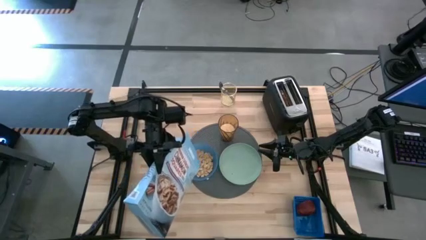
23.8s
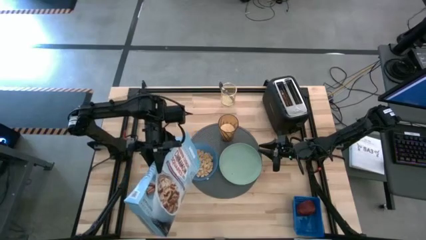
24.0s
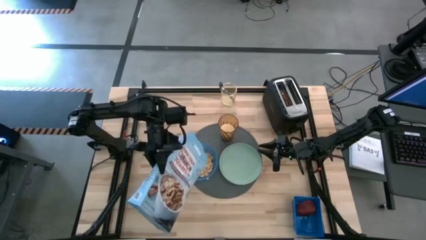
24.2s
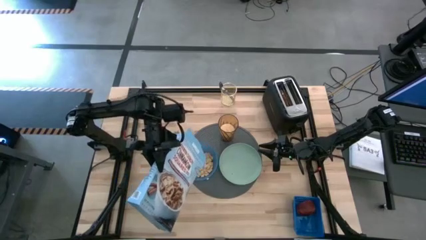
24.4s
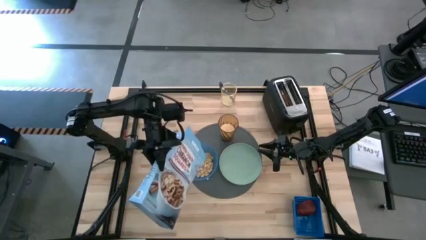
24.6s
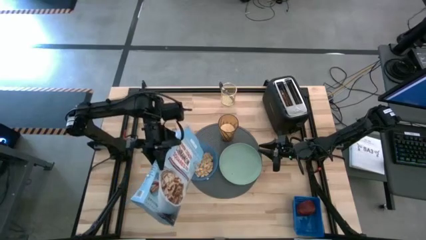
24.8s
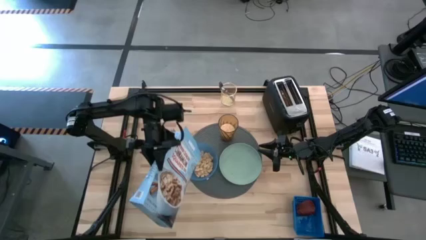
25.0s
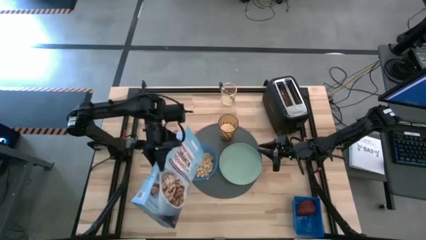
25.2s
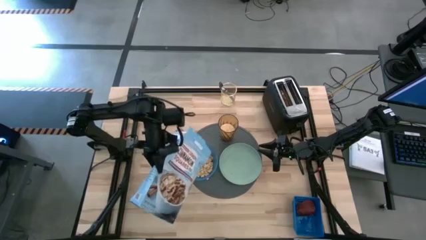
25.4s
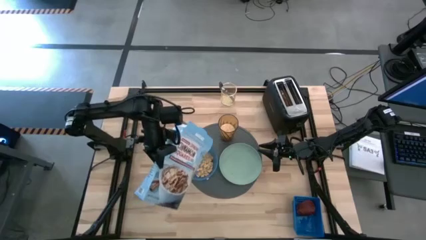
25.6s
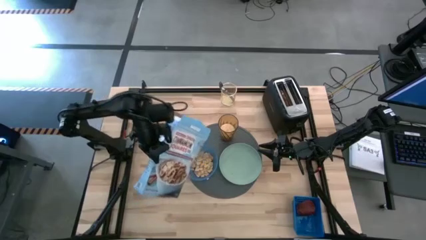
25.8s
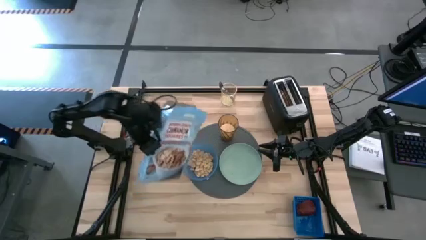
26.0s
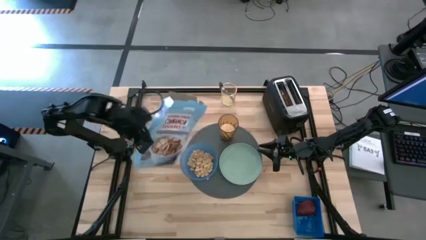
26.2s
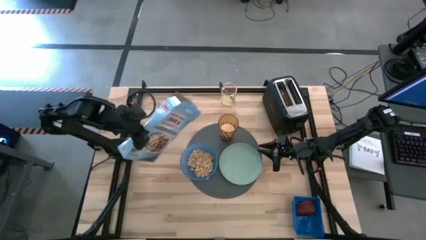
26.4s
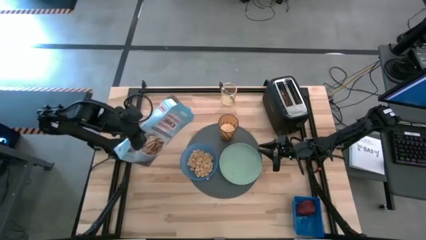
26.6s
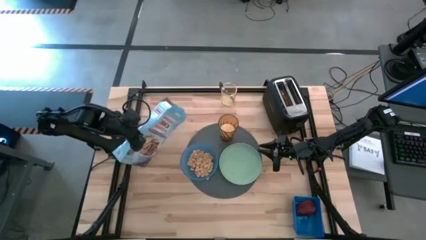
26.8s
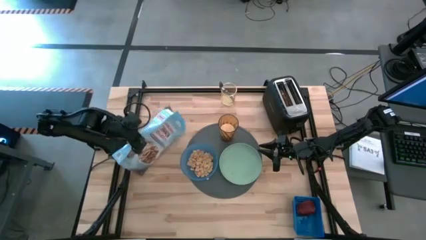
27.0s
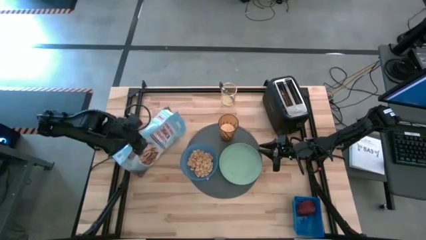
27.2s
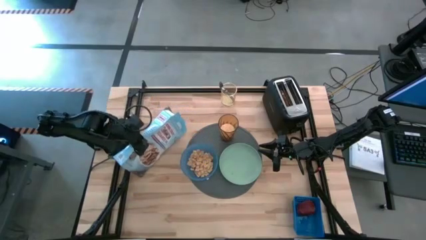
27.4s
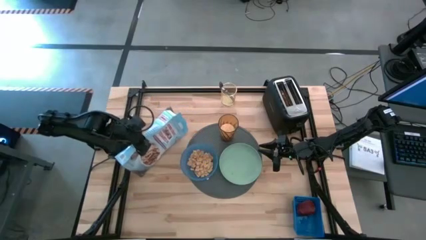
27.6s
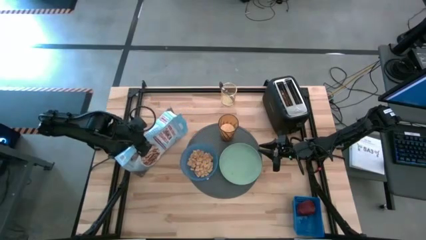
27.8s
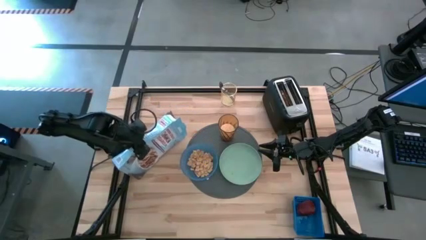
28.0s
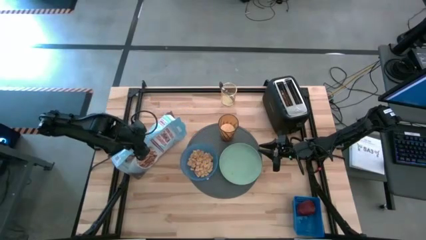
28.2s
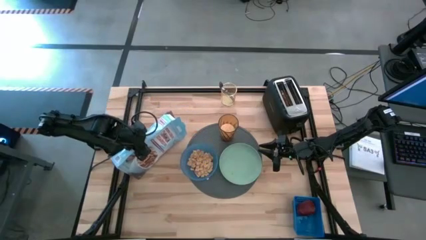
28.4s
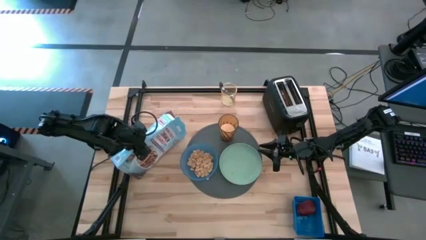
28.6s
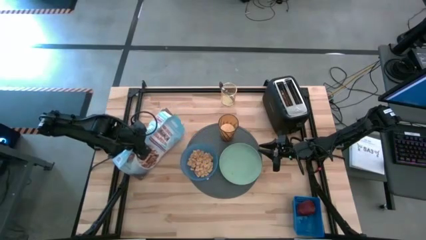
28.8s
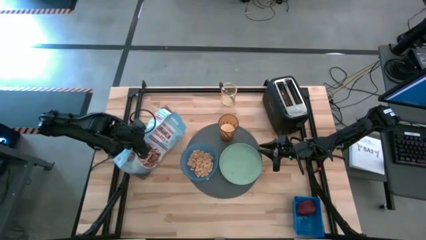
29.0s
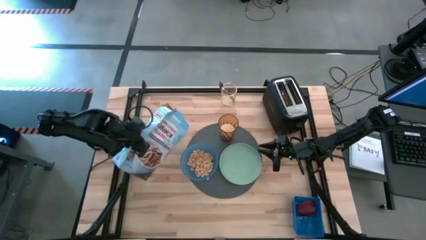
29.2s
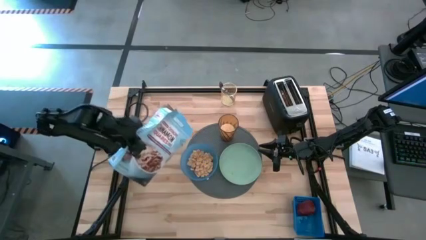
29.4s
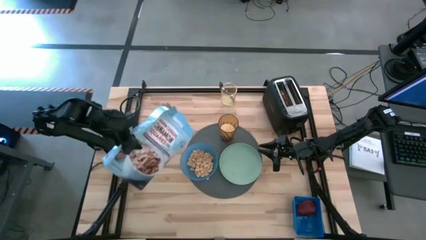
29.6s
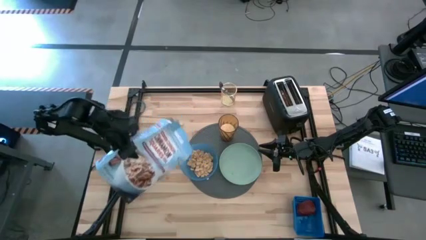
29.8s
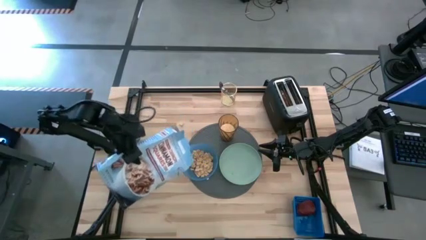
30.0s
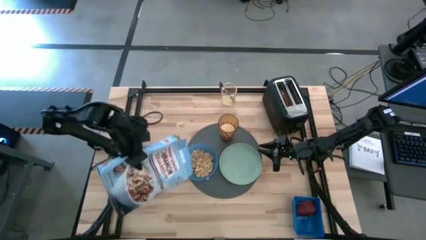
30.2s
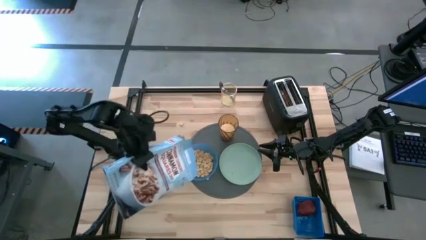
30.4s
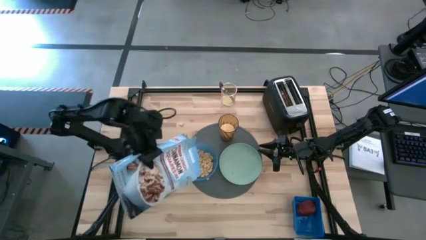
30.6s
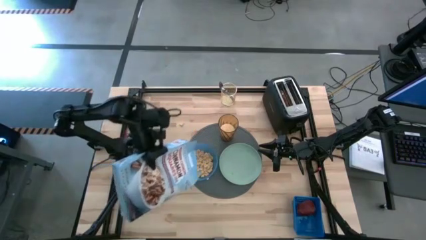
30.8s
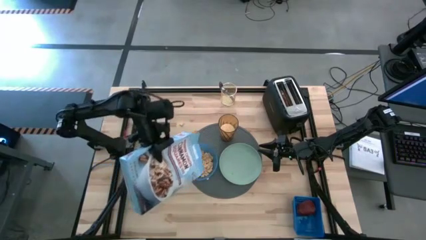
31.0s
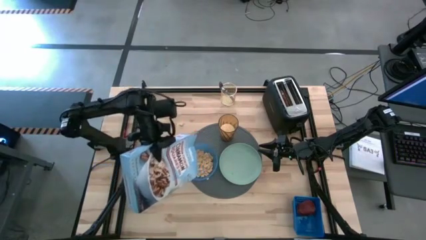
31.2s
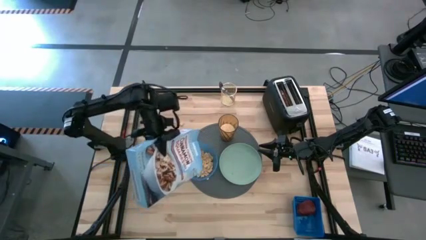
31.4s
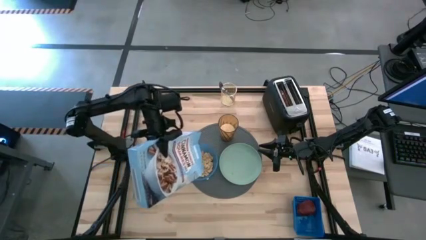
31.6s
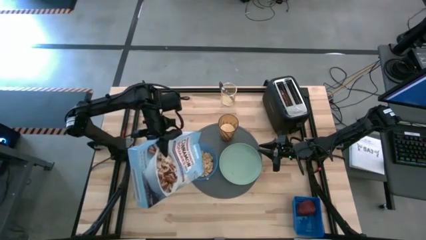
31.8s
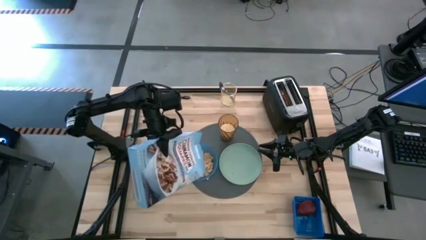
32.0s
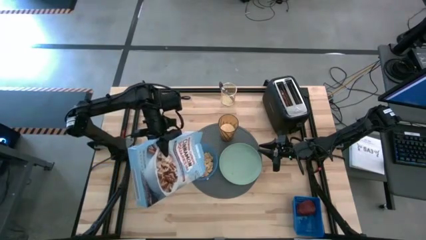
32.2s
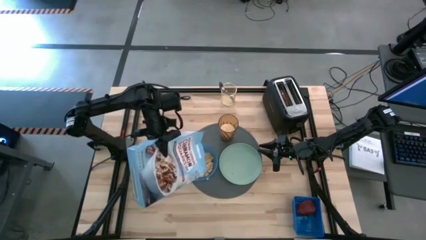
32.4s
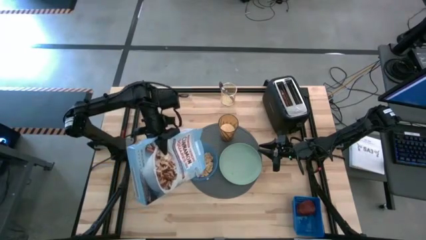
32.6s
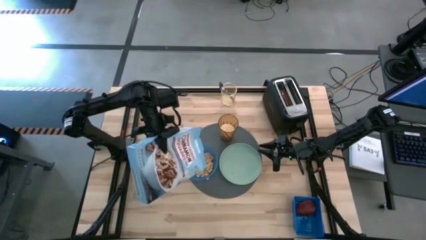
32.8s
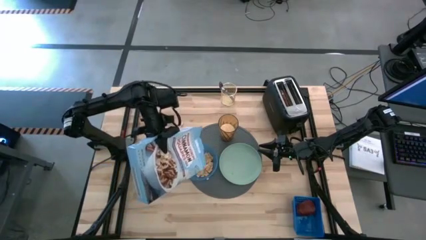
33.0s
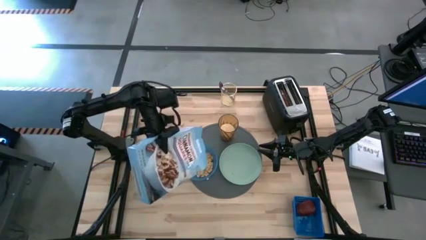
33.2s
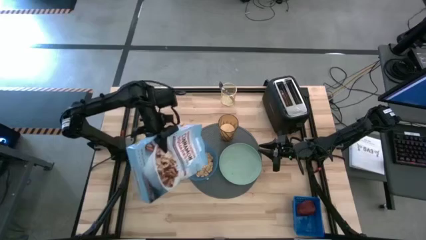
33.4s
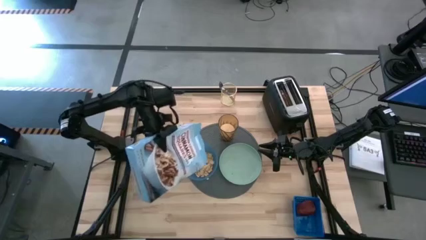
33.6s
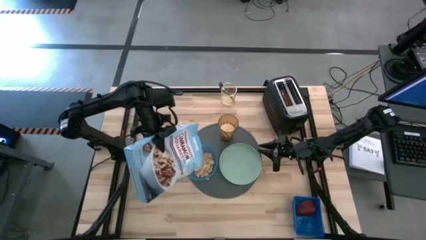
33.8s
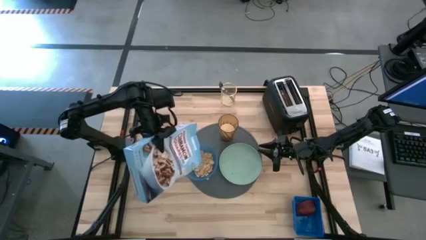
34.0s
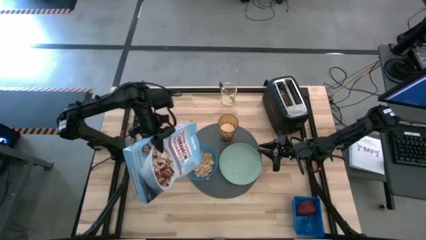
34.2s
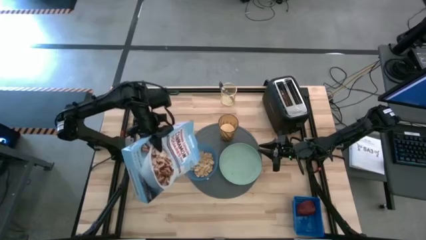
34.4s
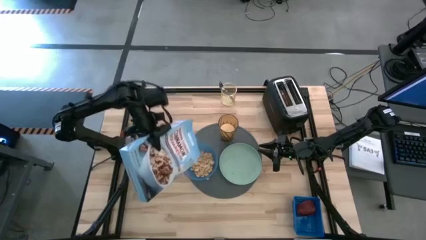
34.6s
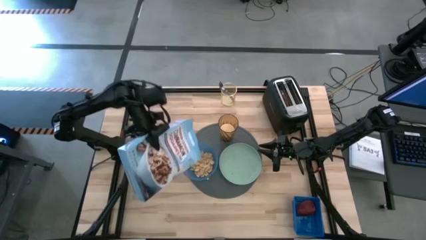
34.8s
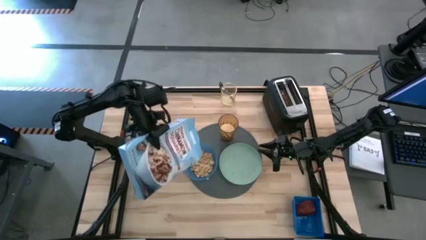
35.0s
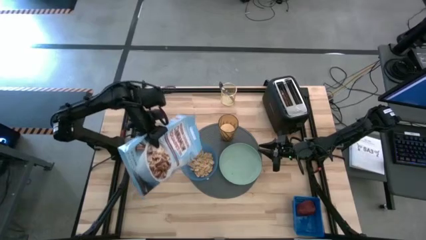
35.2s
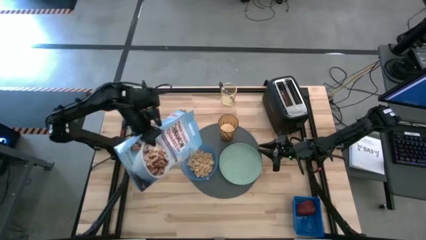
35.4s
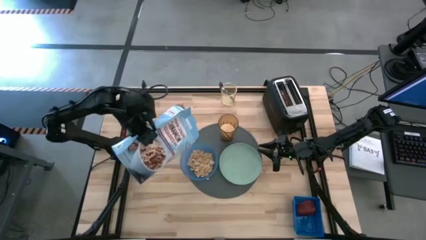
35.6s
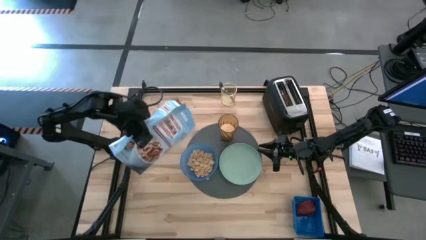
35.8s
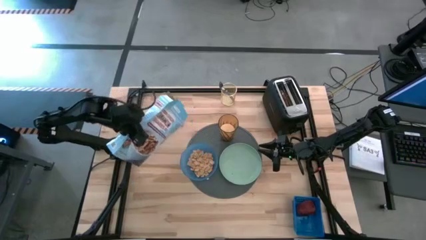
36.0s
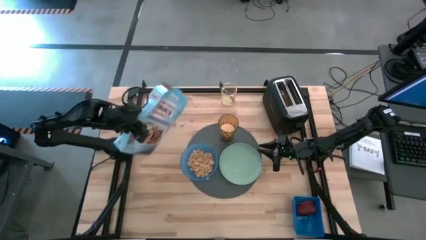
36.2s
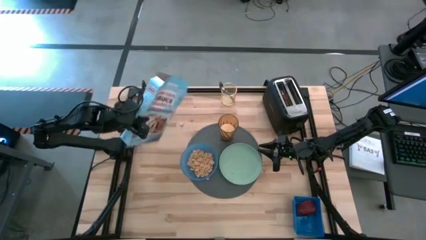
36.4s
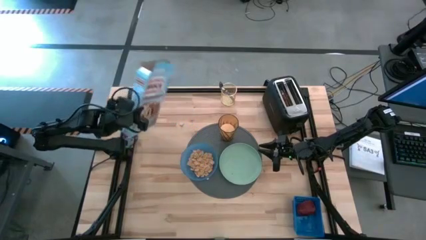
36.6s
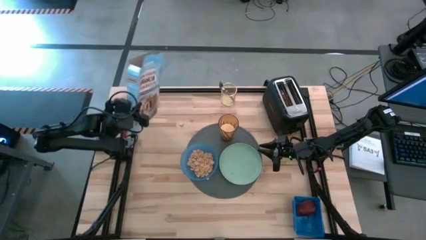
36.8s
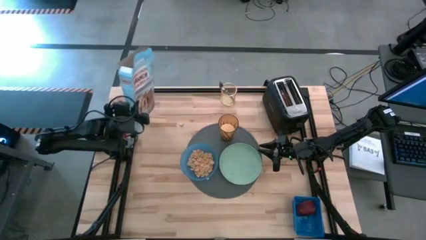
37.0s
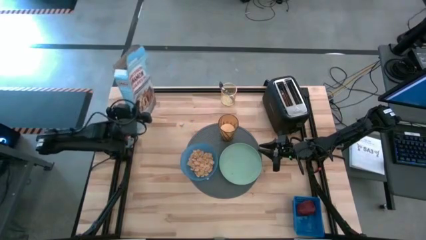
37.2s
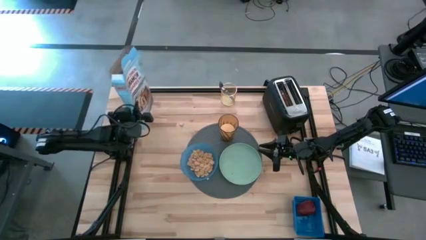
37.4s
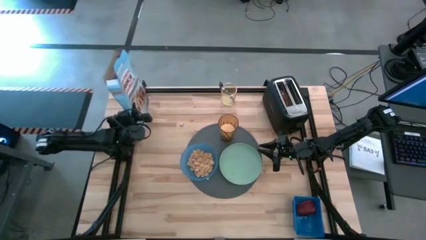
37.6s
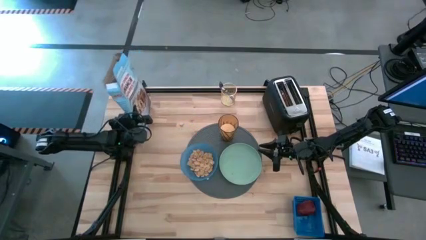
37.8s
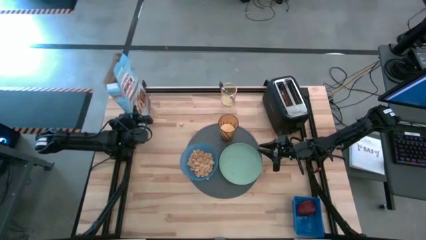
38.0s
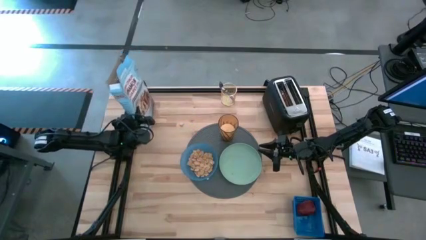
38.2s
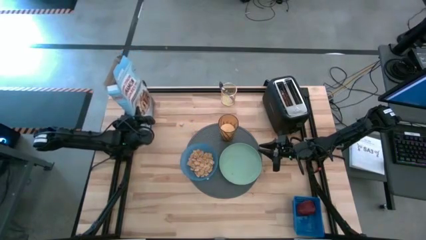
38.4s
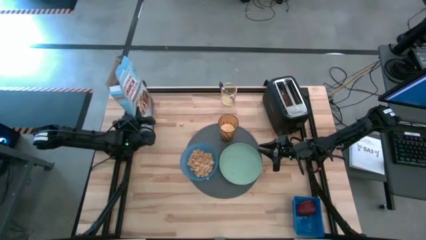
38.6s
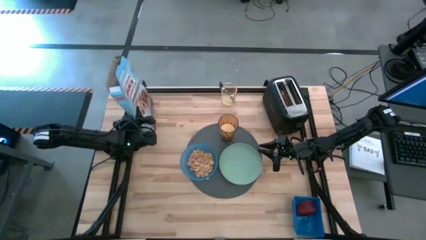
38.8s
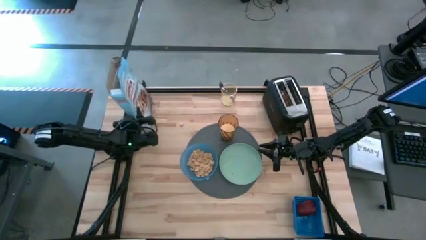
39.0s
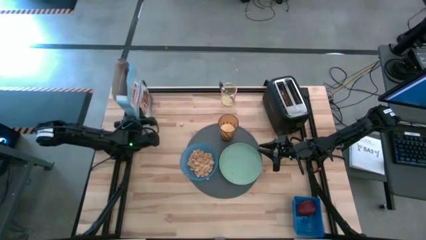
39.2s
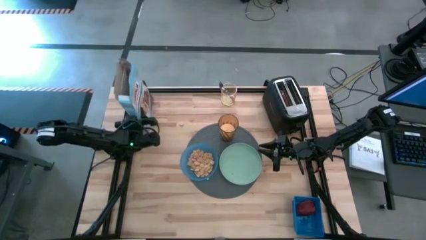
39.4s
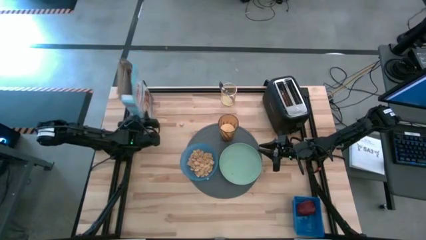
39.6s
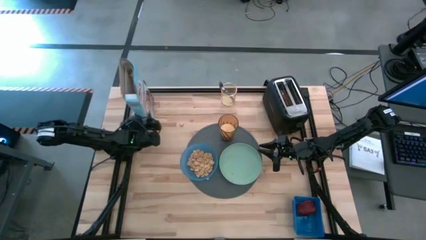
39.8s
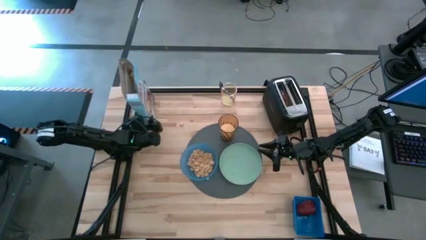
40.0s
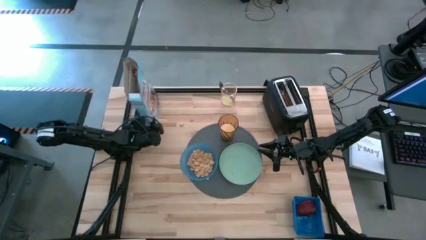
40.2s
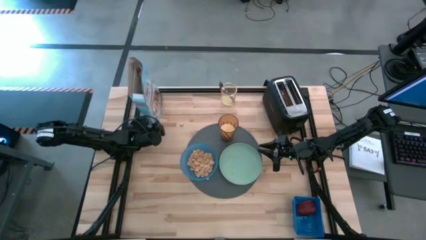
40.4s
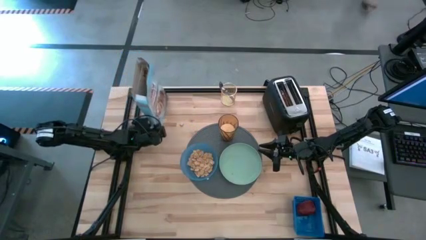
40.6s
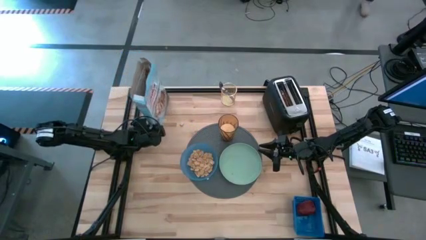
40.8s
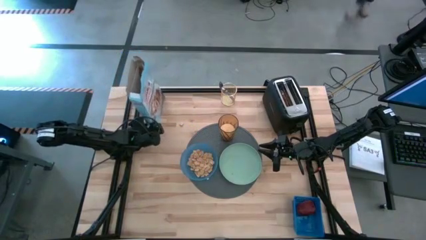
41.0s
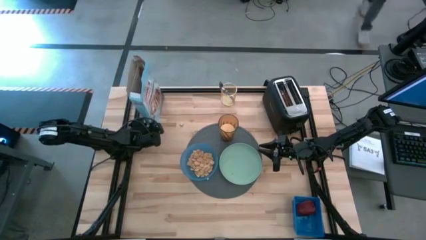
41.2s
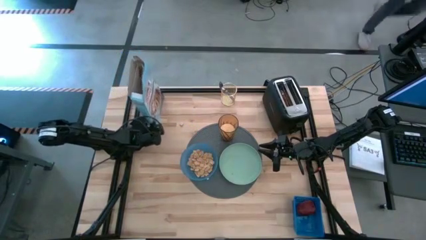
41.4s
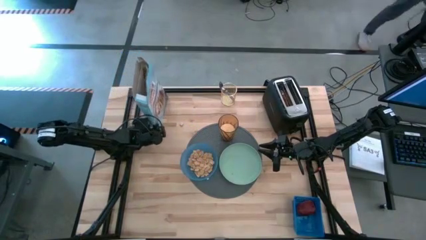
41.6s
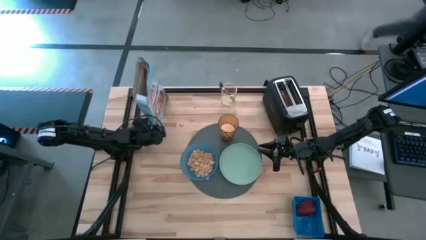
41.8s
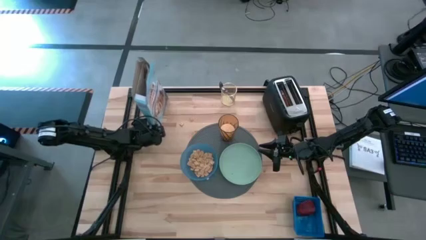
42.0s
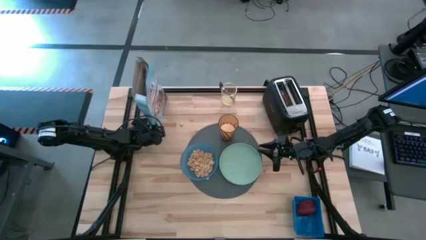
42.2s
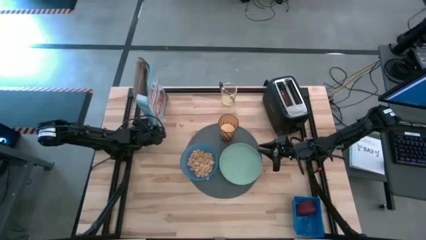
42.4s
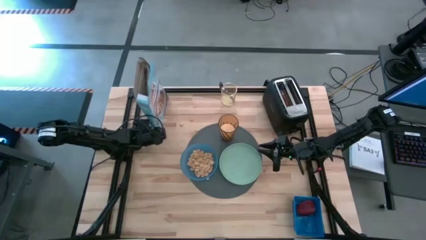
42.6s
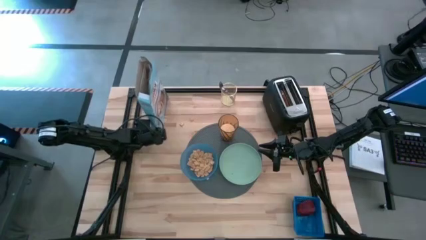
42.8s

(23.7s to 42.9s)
Task: Arrange a breakfast setting
Pour the cereal from the cereal box into the blue bowl
